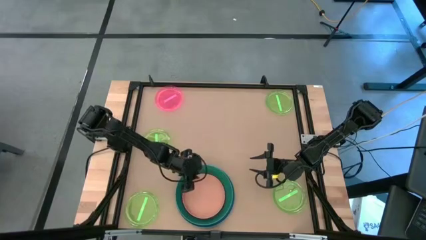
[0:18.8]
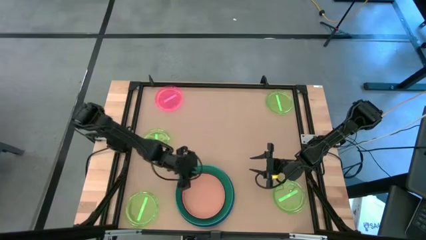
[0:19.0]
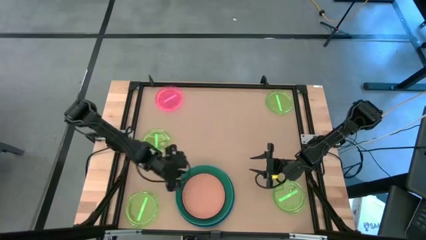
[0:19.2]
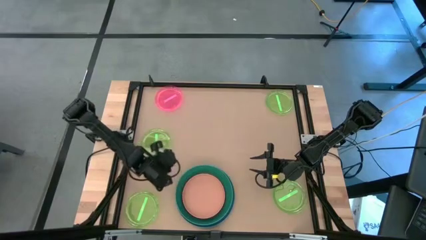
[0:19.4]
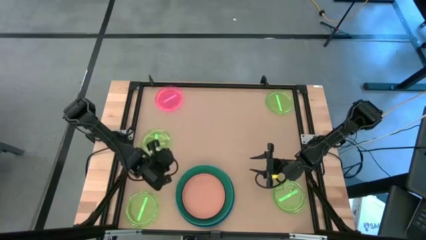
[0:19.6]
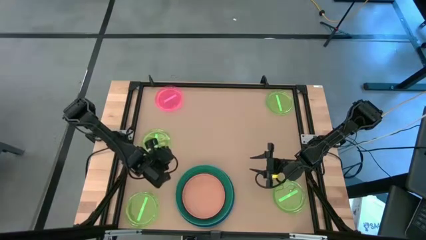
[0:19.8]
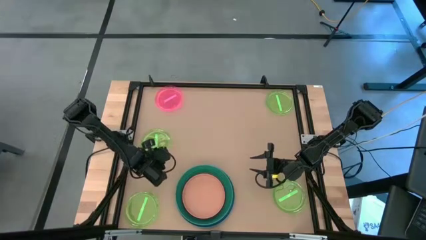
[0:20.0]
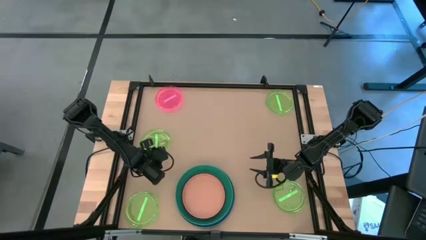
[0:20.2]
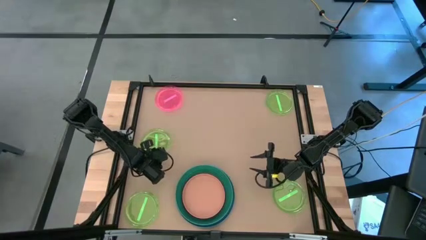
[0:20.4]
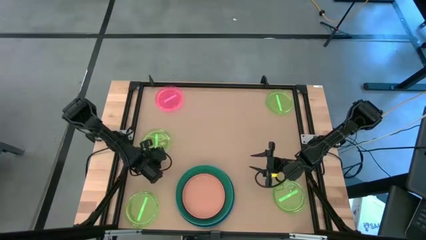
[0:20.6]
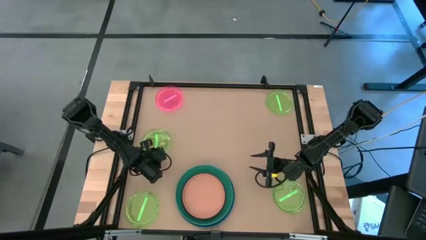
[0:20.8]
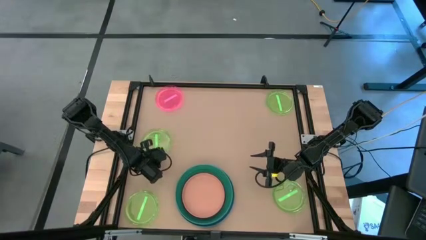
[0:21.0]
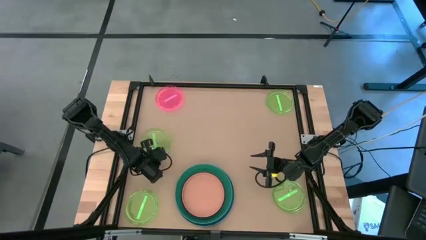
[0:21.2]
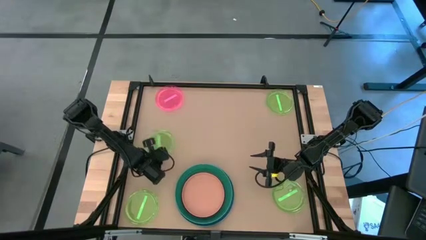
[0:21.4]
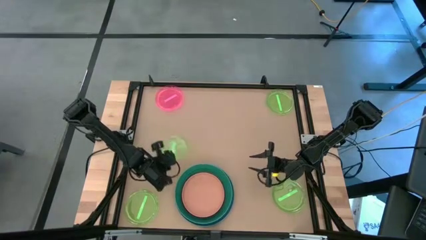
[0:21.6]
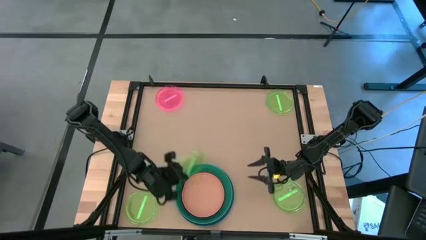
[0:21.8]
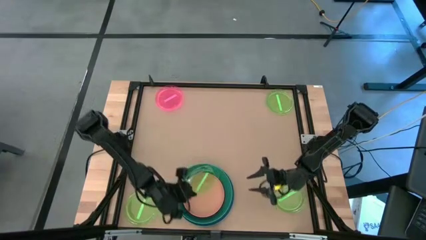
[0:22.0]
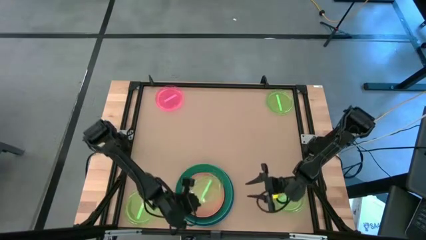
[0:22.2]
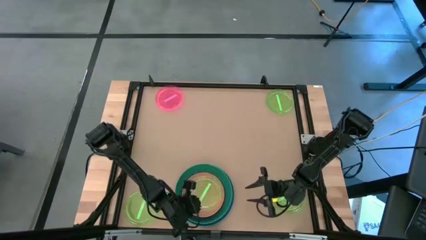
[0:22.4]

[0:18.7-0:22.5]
Task: Stack plastic plates
Stack the light green plate on top of the orange plate

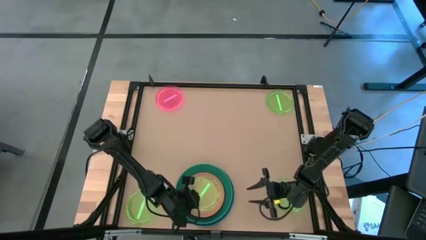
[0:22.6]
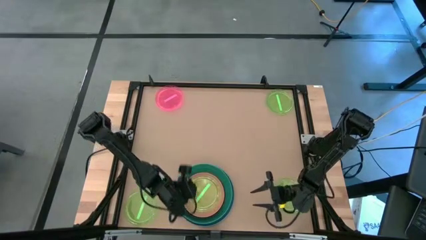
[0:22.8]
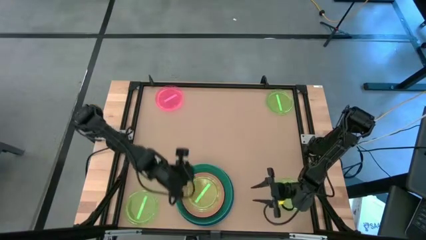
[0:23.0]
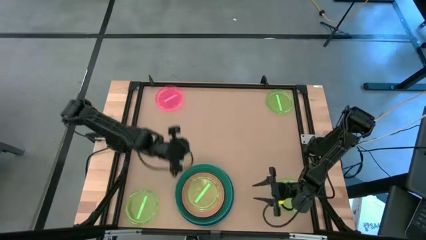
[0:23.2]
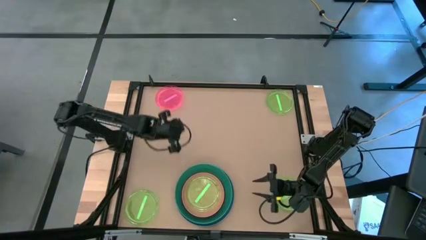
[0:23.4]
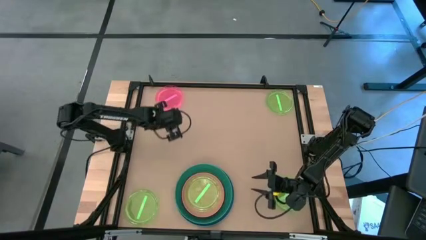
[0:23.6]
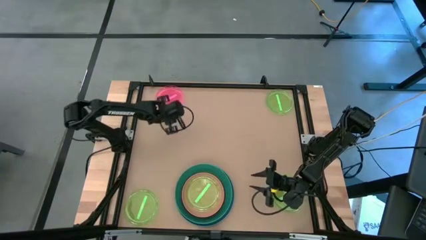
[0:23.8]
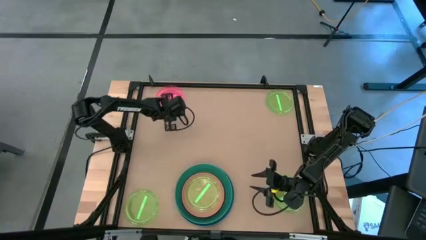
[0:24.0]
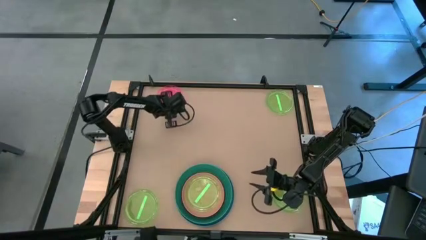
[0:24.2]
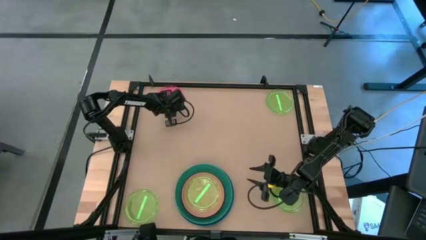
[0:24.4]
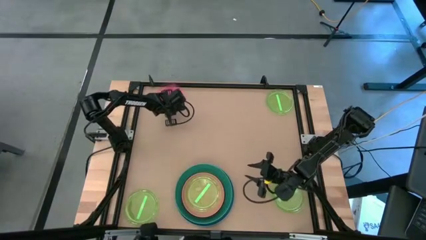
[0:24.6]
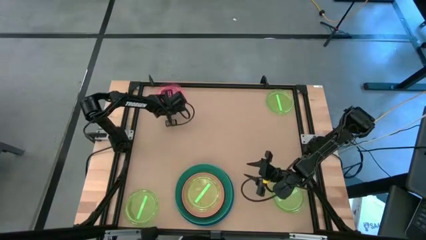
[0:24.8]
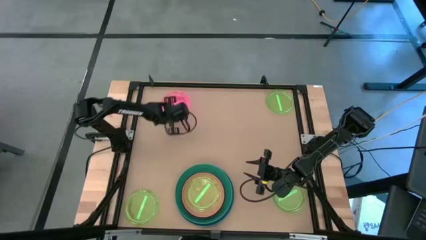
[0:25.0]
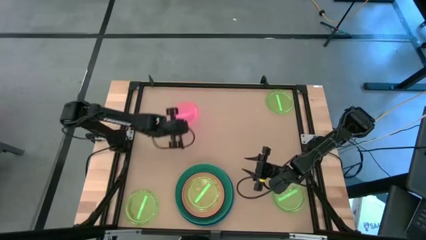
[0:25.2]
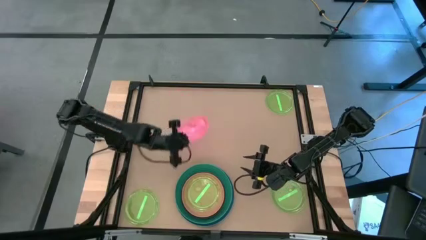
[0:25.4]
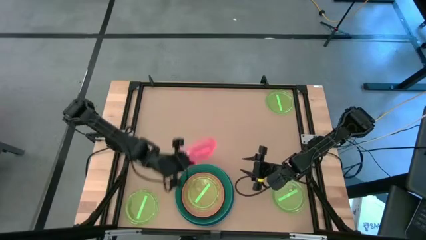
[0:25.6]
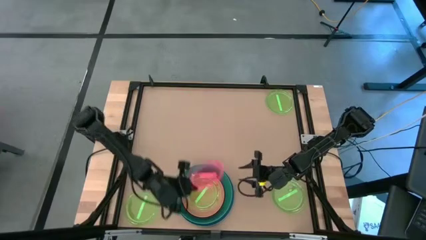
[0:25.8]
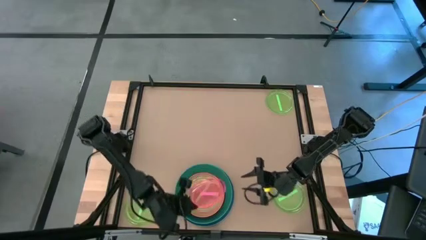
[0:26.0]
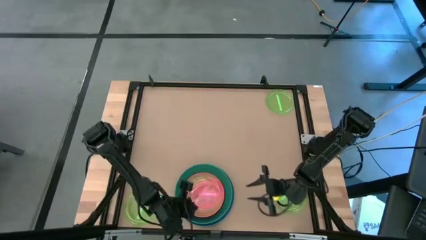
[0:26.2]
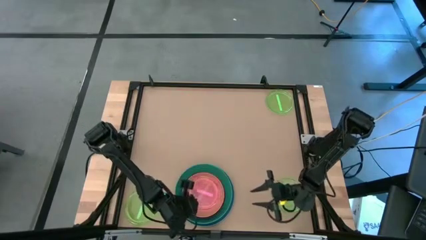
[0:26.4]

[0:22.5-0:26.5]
Stack the light pink plate on top of the light green plate

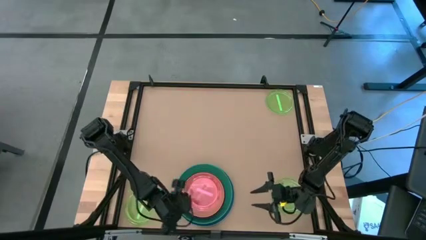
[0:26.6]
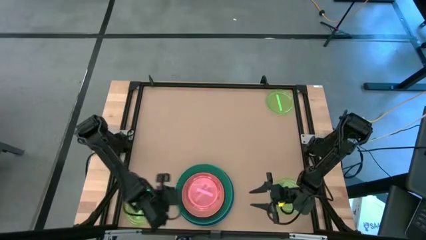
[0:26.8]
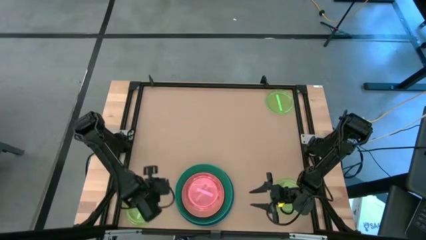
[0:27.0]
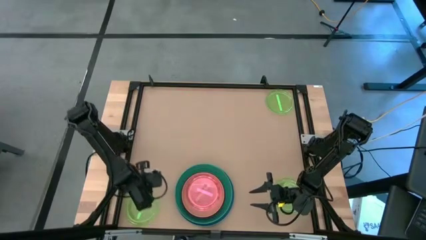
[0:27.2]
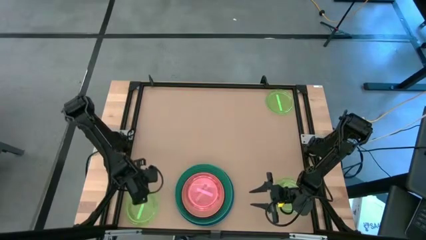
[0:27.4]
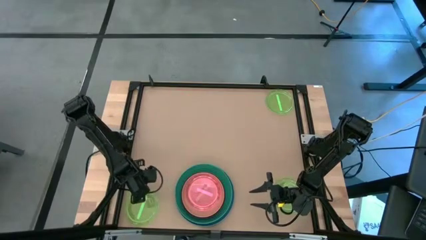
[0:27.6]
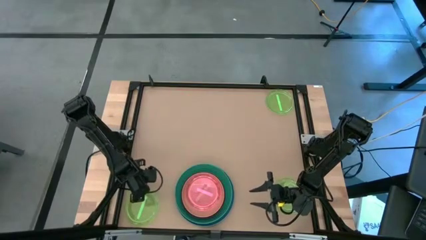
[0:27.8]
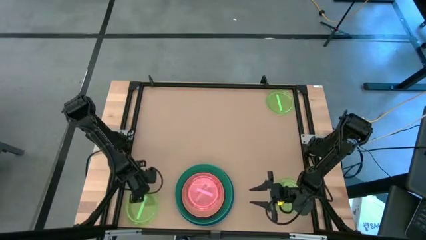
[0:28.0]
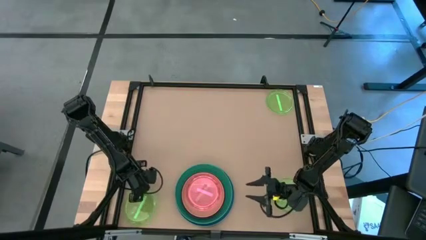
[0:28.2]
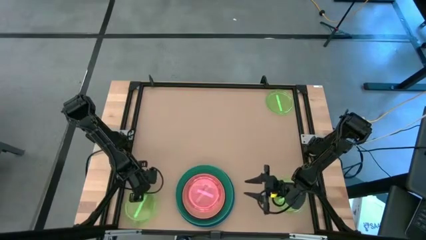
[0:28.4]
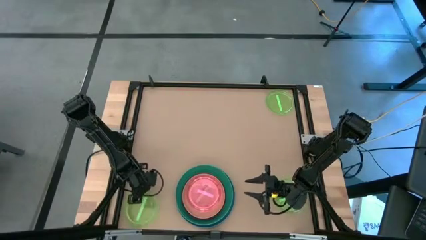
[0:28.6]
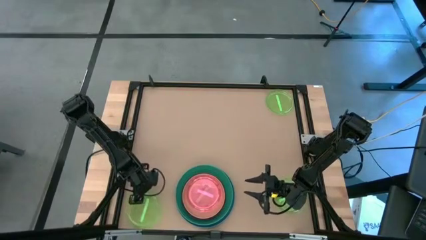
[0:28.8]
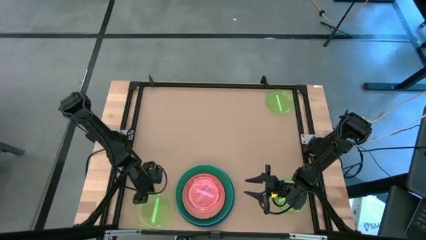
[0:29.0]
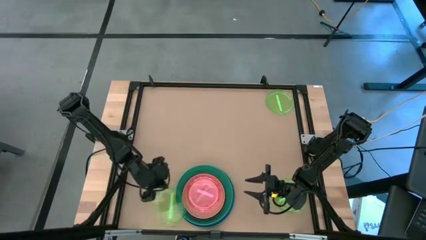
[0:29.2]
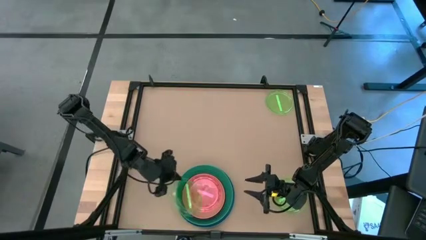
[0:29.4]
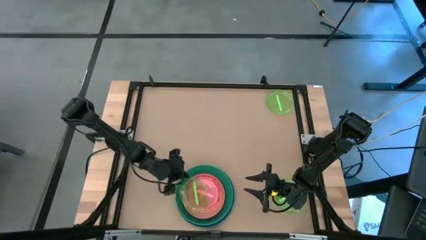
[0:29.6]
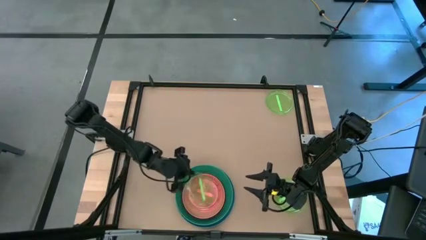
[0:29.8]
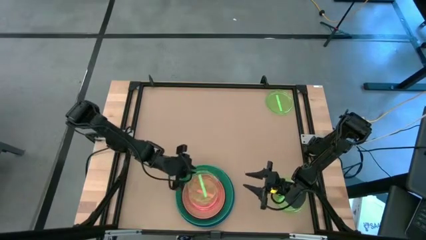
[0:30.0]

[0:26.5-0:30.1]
Stack the light green plate on top of the light pink plate

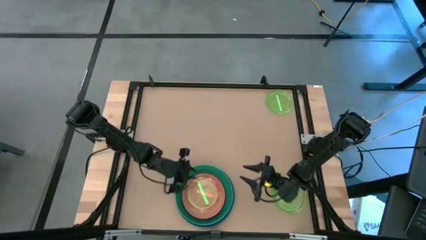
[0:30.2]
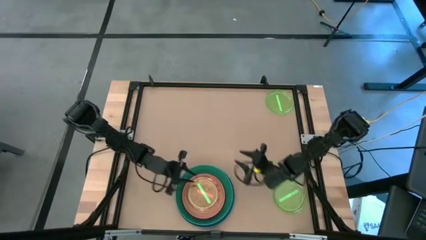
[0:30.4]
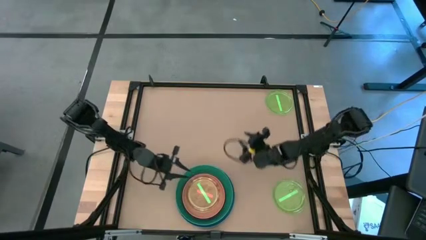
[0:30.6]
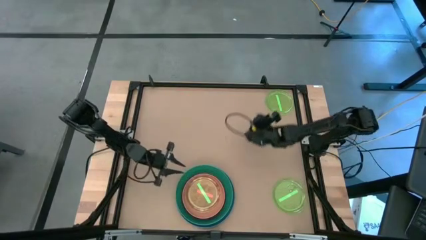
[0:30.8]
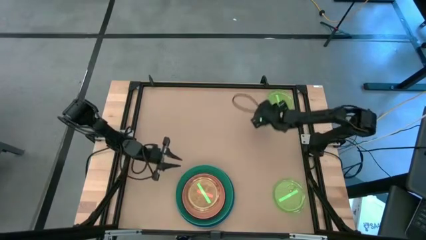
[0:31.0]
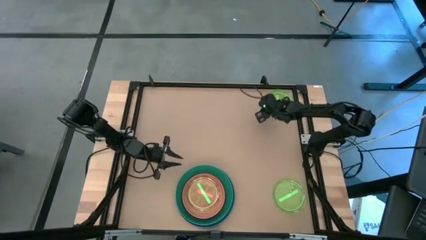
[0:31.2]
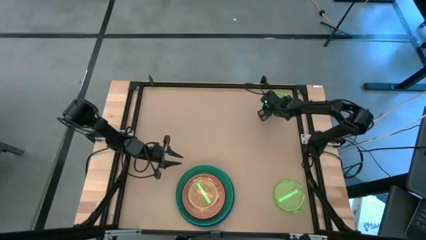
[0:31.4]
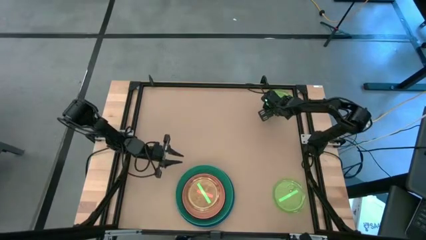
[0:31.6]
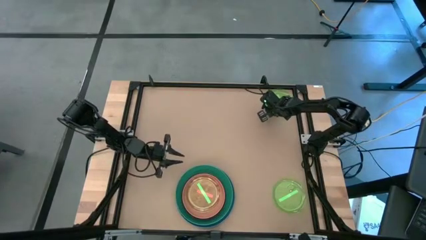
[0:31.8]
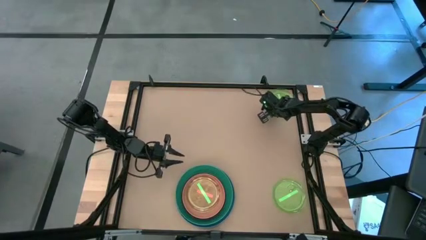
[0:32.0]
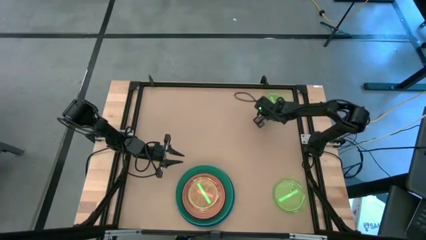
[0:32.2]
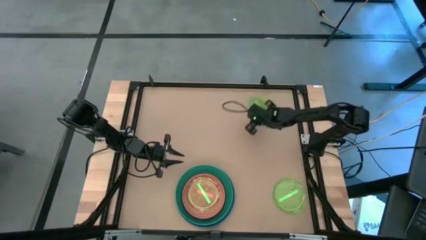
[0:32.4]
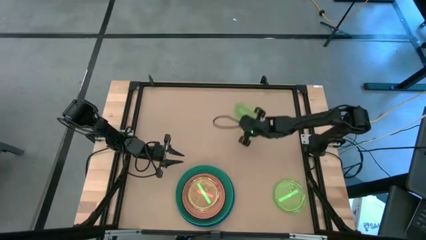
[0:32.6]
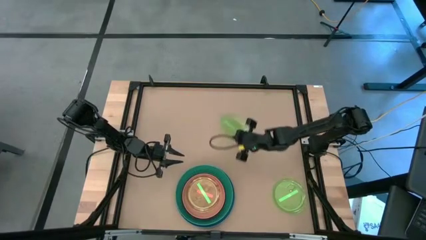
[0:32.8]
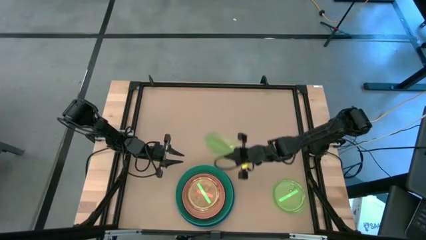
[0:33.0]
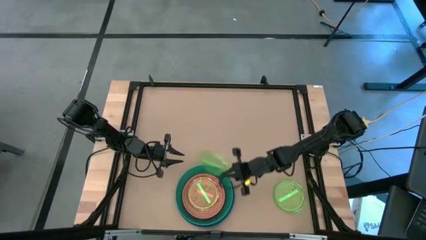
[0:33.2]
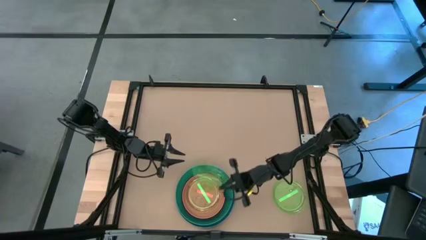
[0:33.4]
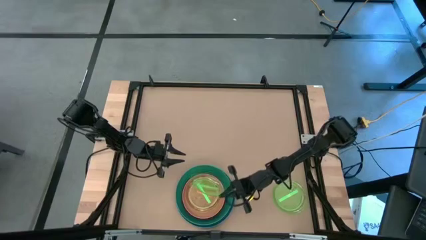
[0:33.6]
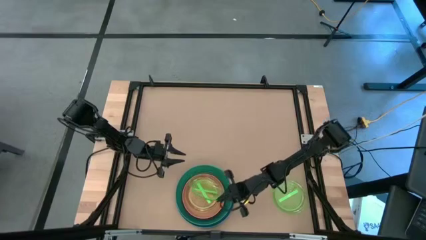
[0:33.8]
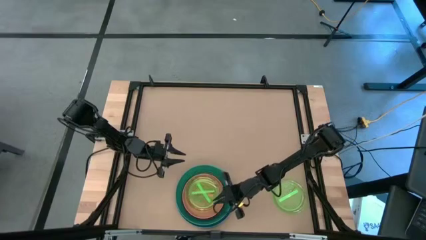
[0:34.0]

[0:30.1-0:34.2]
Stack the light green plate on top of the light green plate

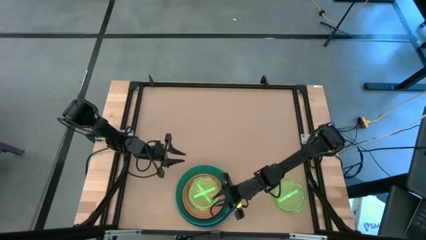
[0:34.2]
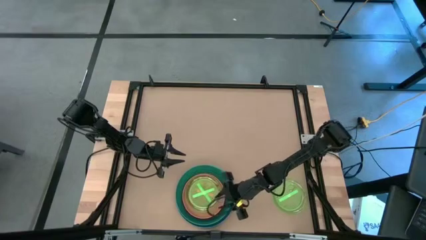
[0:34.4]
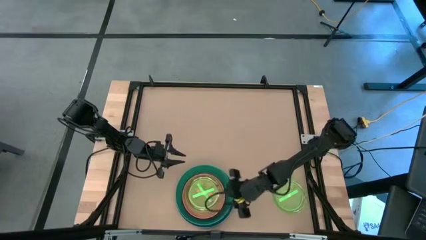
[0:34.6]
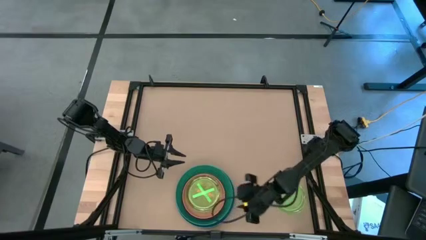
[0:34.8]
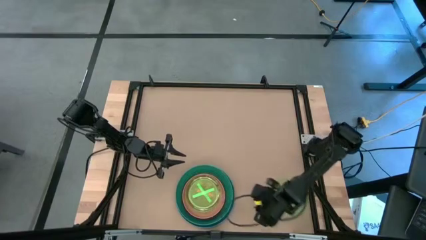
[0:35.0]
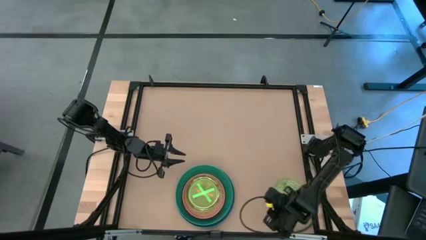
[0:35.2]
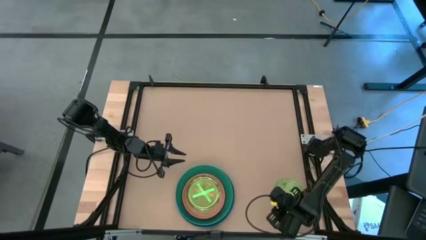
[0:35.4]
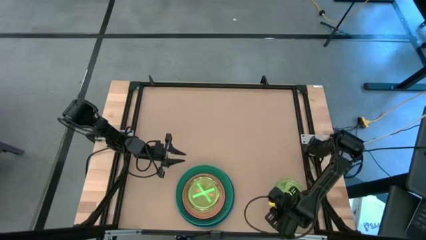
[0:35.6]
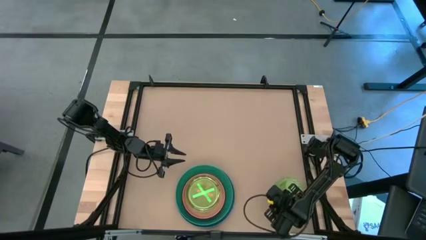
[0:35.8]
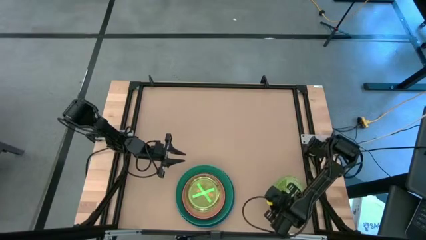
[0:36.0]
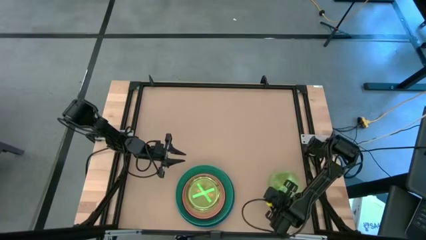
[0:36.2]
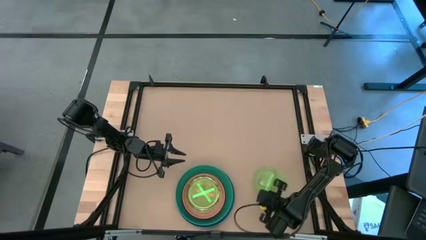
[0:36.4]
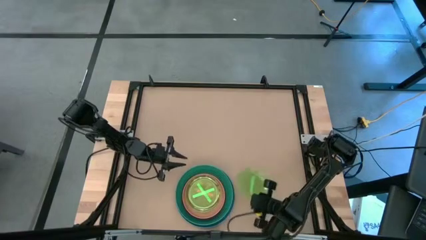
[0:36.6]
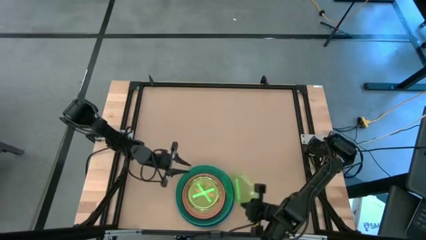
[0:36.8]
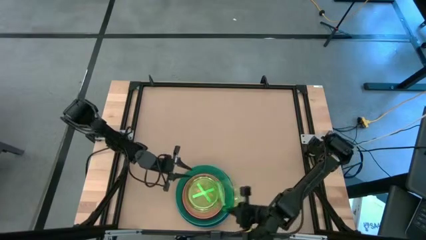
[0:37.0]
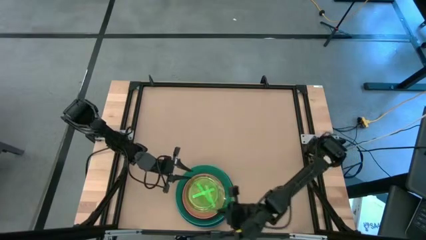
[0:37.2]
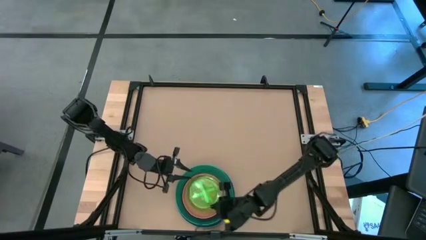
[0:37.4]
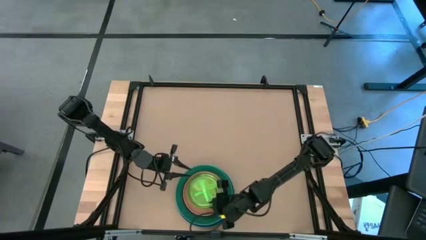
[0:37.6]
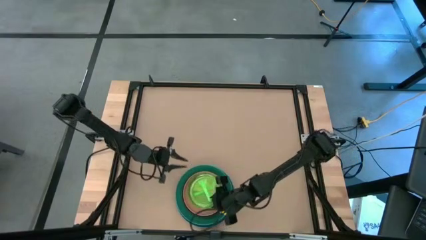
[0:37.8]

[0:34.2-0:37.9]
Stack the light green plate on top of the light green plate
